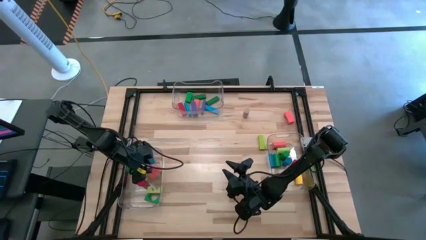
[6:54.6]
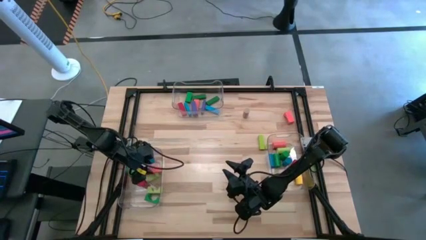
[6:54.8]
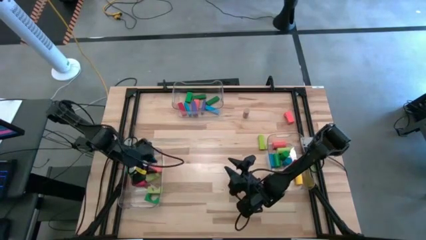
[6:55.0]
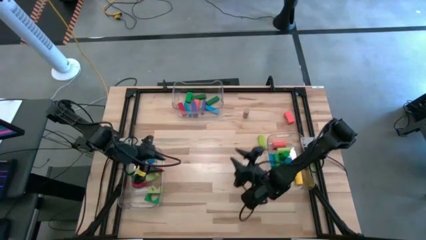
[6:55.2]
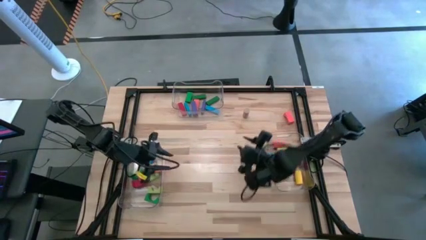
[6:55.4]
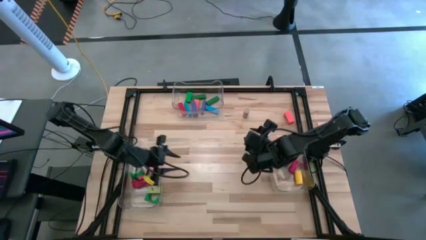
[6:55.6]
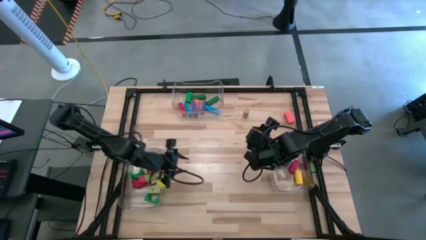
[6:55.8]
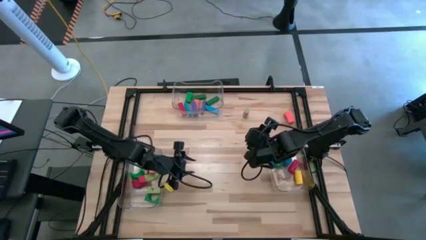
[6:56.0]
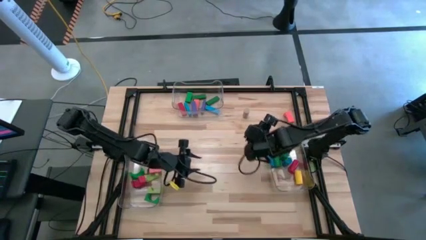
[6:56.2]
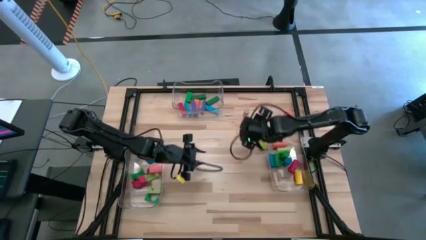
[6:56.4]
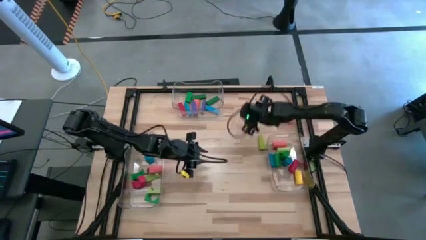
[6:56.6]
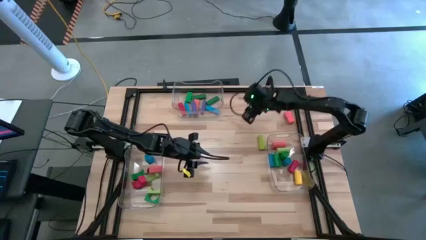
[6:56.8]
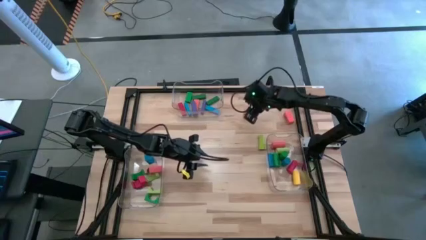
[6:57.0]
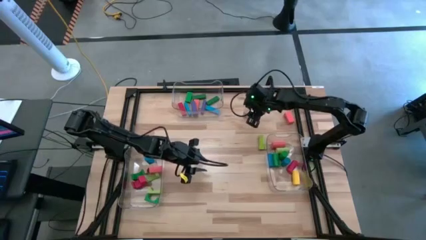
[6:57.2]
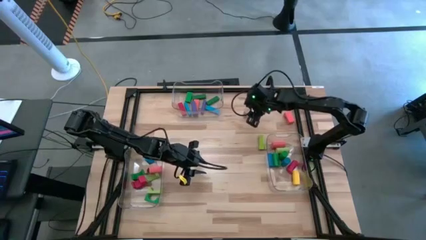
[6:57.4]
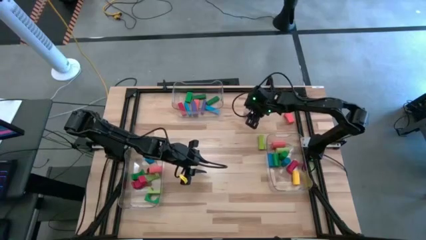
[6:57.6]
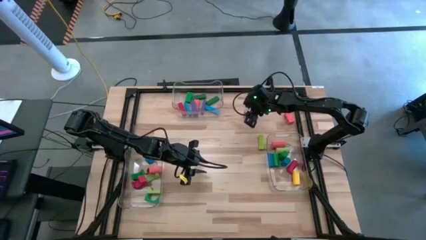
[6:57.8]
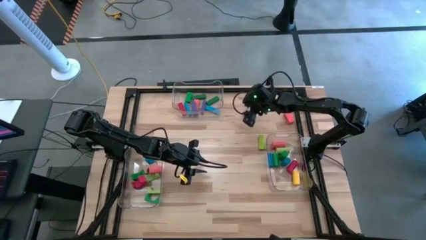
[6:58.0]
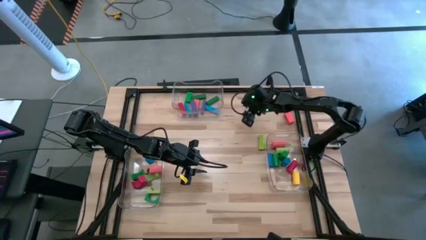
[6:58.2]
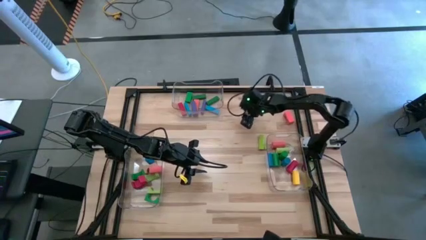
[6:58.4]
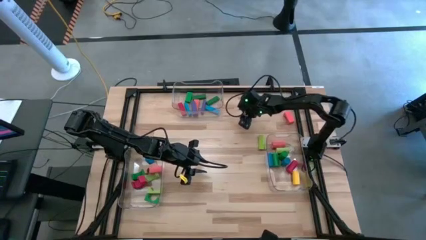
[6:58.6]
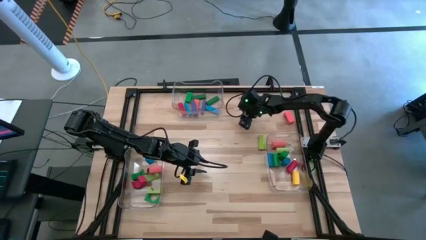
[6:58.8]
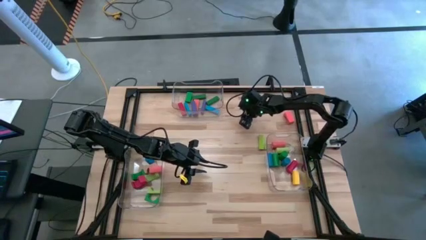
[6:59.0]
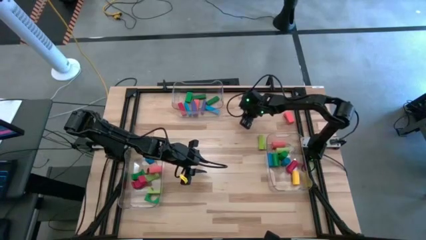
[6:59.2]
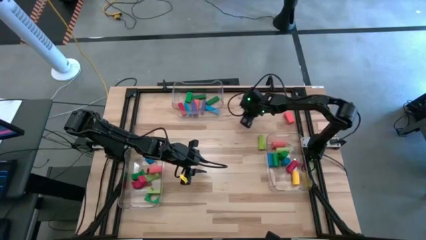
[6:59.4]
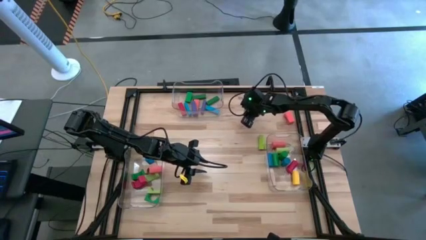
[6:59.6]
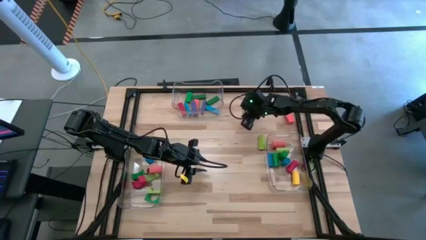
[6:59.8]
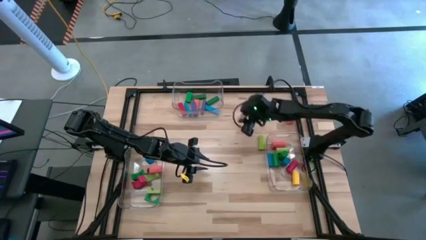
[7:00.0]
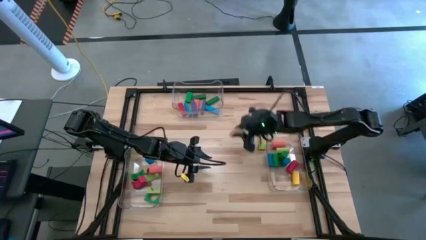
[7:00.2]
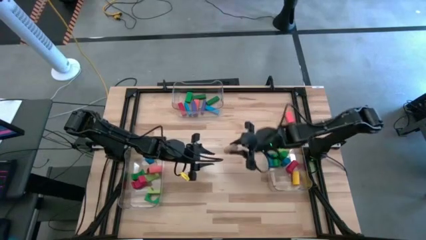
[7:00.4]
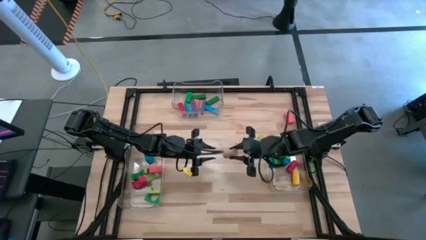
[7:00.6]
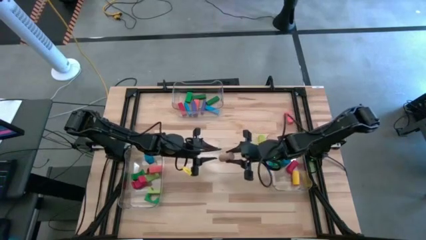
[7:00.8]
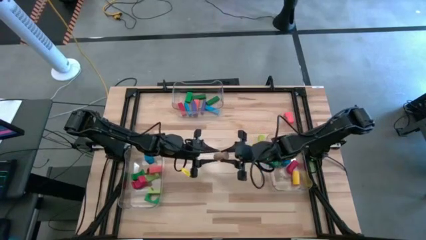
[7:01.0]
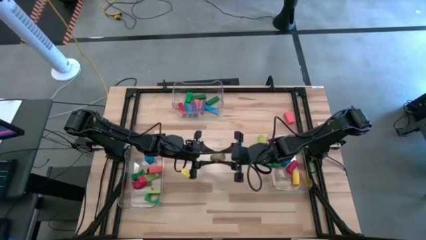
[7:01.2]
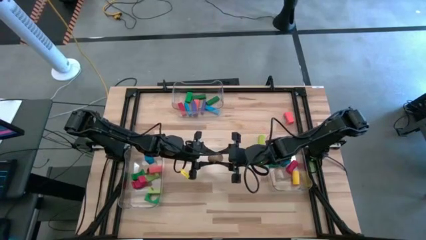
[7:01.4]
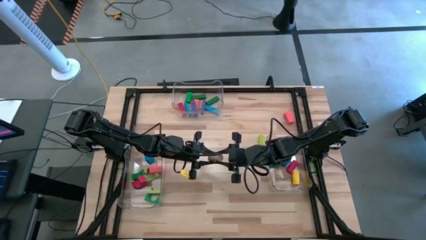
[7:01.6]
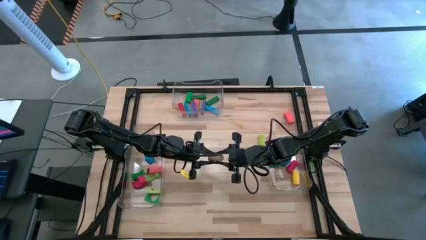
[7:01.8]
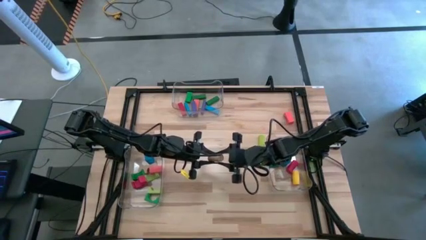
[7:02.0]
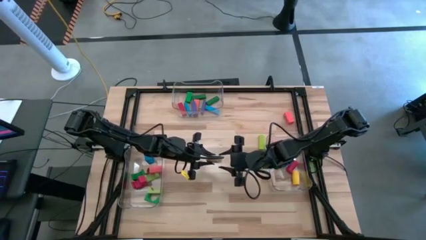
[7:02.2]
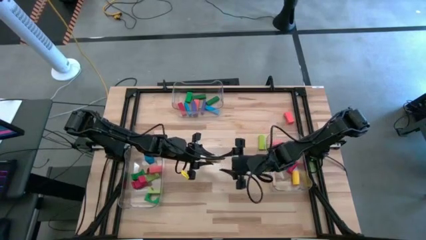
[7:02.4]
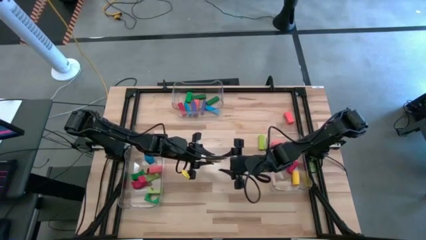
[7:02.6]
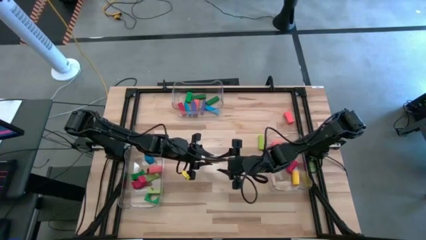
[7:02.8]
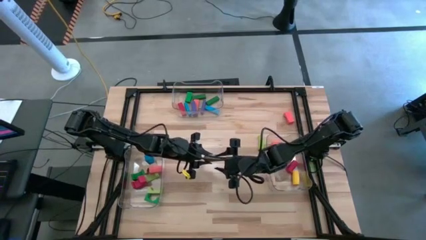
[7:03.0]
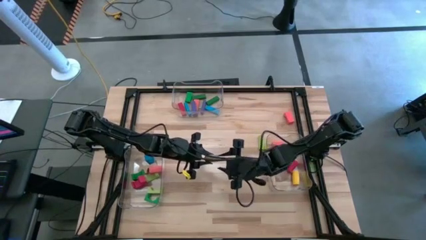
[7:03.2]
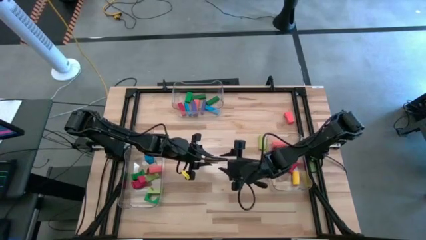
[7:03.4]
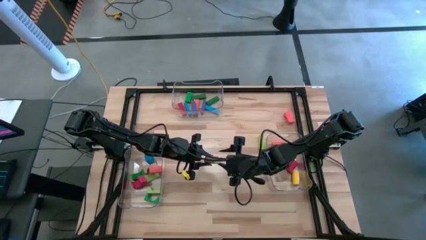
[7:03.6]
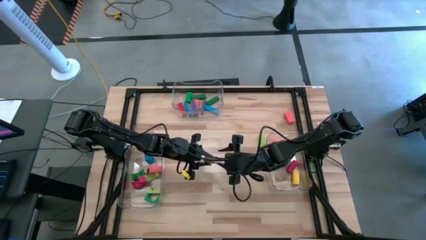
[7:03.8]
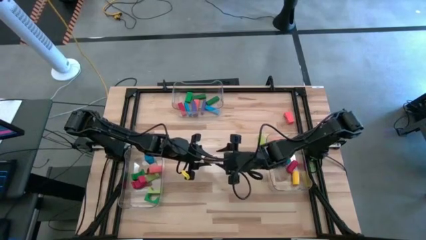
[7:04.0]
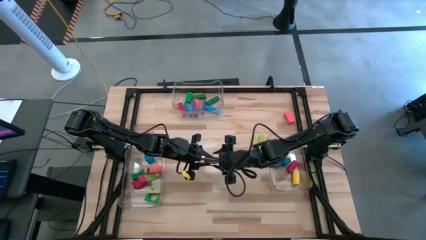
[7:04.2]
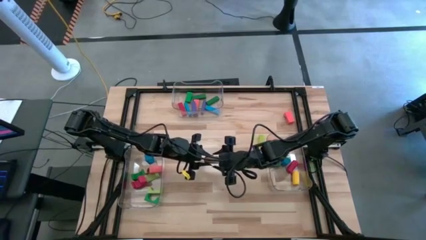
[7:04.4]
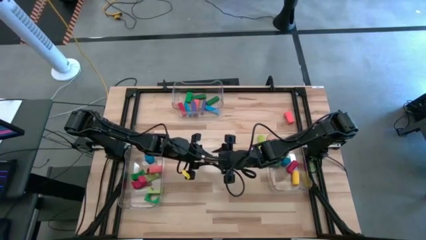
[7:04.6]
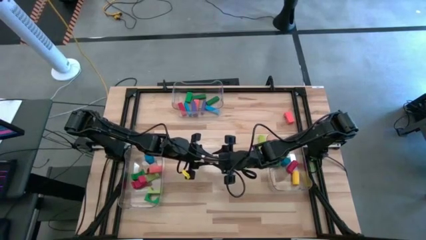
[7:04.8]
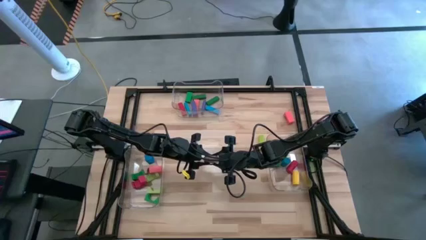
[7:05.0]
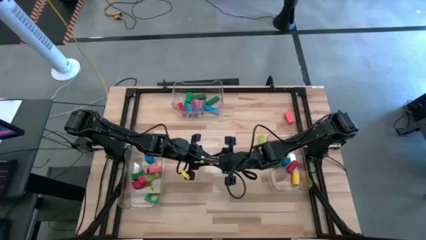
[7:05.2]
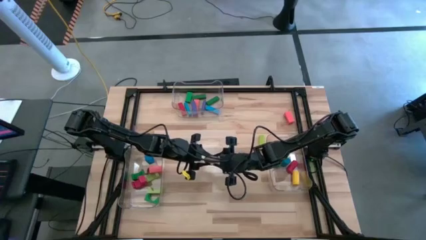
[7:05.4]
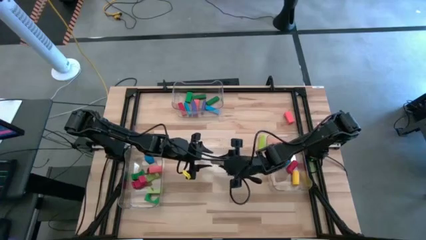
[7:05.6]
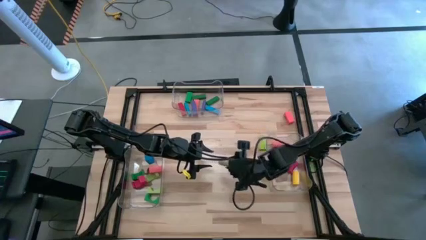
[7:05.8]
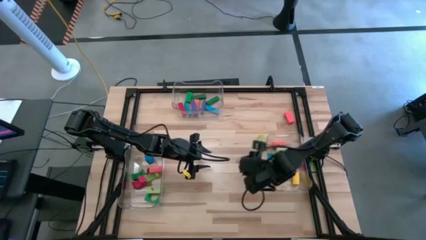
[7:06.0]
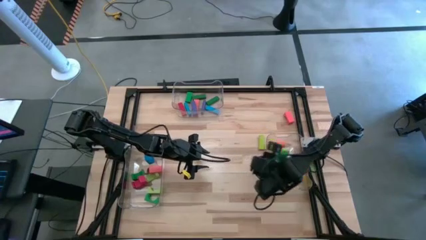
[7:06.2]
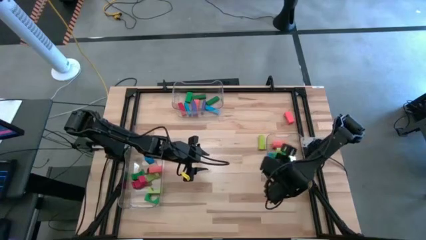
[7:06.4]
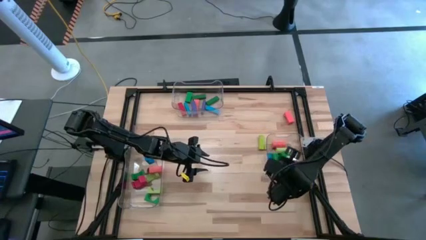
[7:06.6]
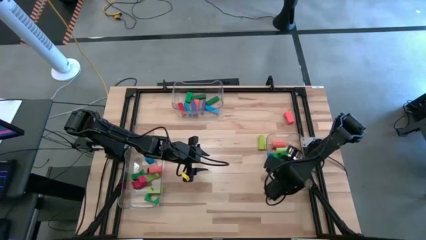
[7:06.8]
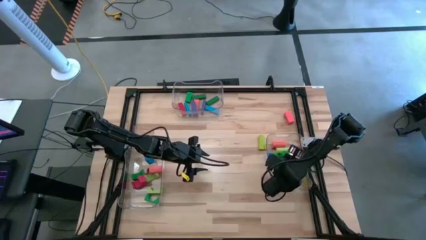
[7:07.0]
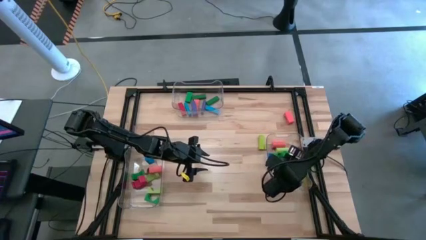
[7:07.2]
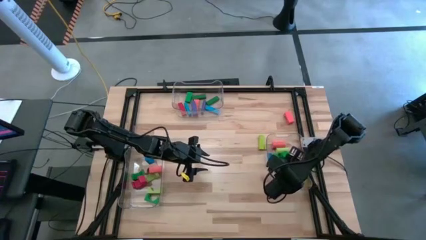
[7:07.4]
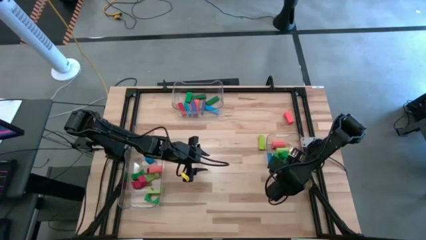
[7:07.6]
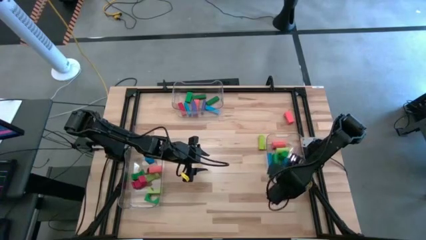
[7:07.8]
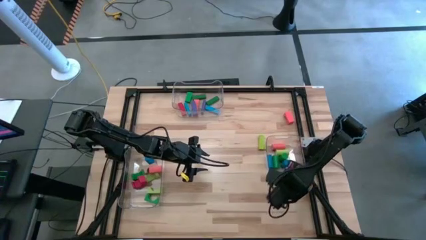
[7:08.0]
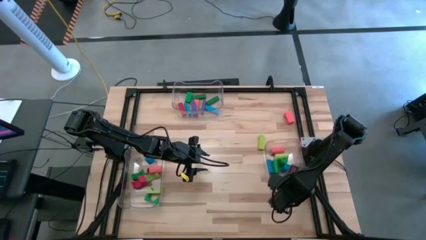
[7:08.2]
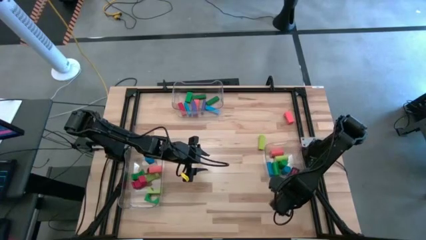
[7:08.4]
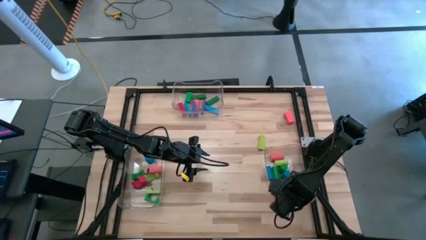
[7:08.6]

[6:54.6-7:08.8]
Task: Sort blocks by size
Put the brown cylindrical block into the right transparent bin
